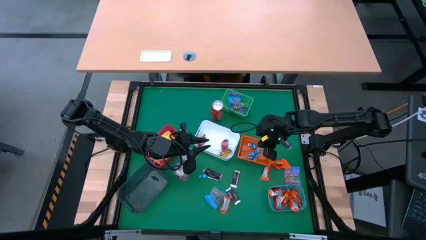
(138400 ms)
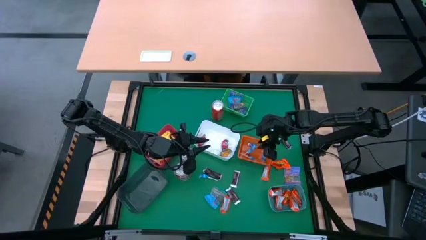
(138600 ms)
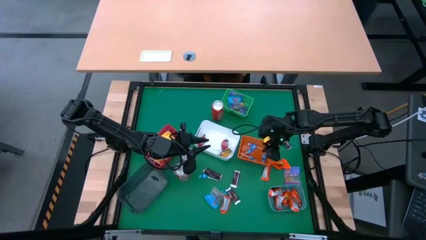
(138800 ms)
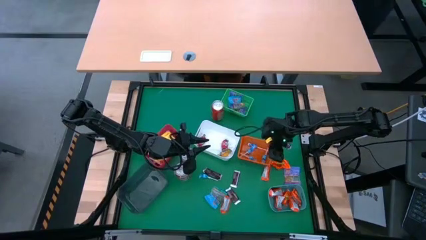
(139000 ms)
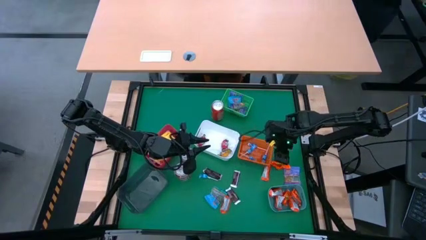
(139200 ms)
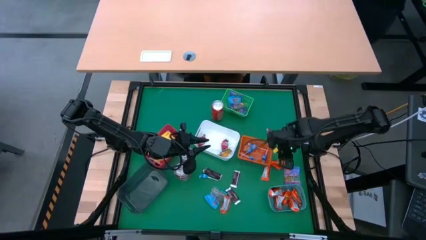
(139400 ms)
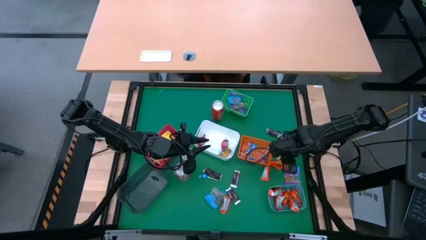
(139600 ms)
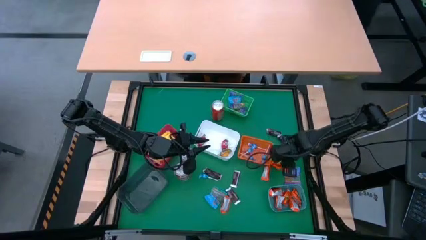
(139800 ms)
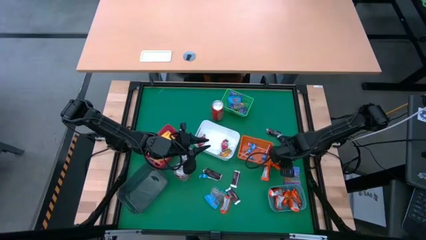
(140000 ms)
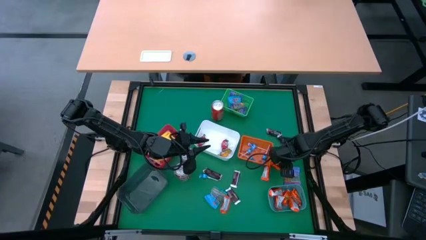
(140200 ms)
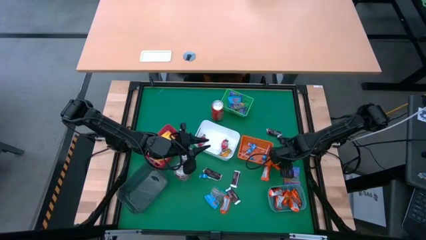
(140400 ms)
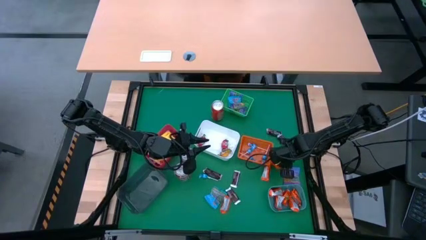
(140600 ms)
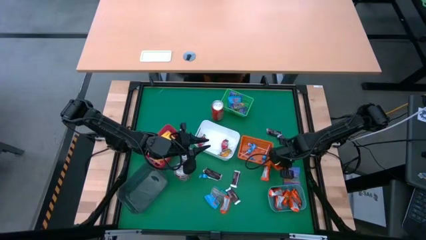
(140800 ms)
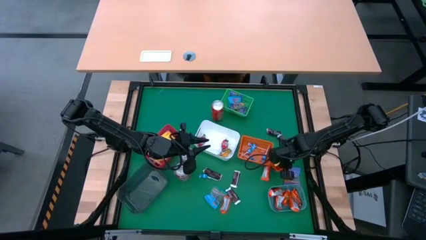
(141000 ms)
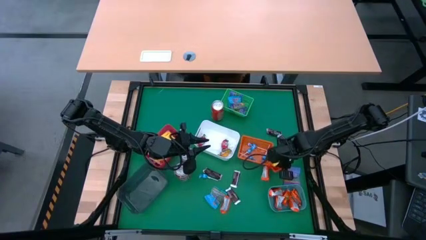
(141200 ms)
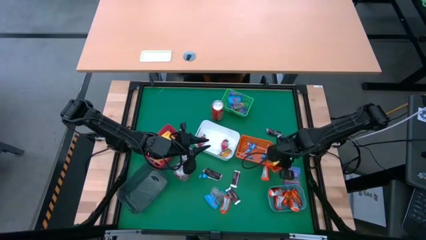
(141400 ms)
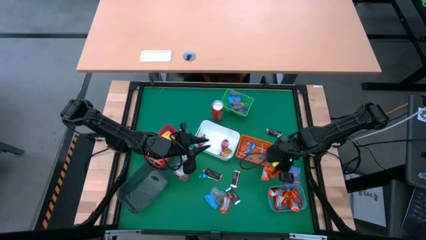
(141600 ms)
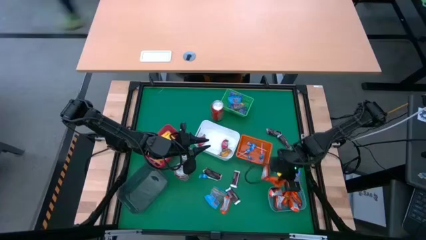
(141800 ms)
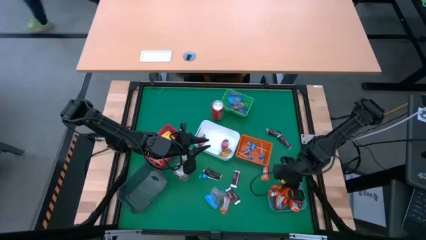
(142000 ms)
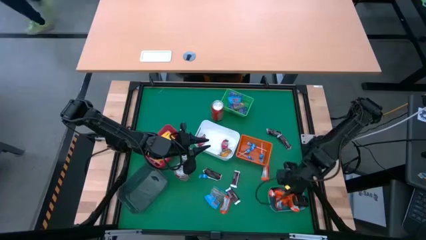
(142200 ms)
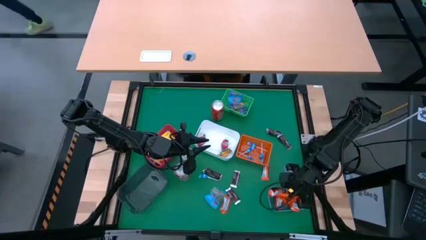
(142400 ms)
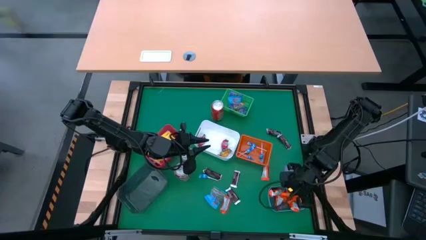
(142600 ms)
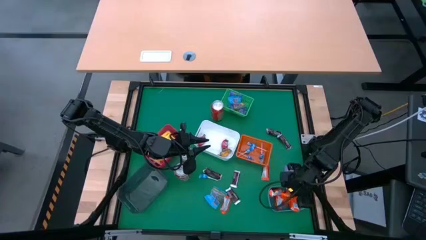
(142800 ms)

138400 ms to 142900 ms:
Task: Sort candy
Put the orange chocolate into the blue bin

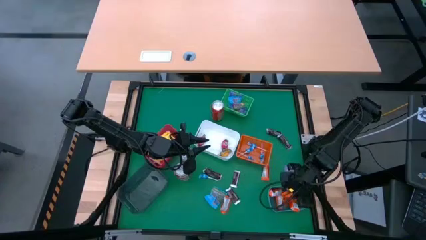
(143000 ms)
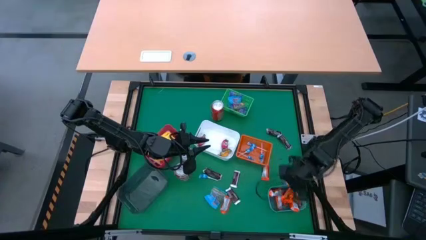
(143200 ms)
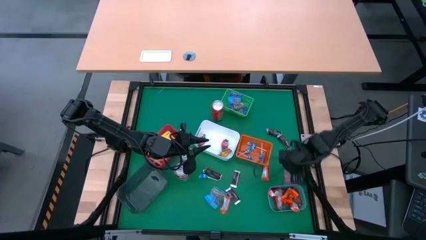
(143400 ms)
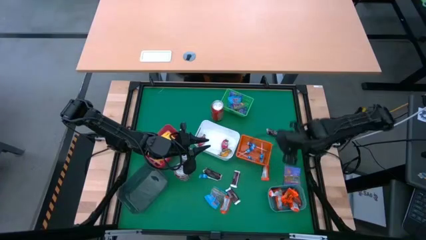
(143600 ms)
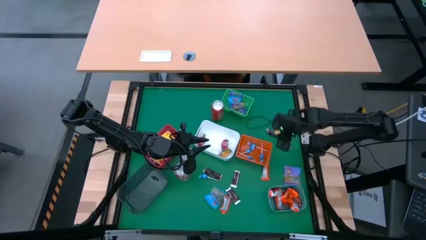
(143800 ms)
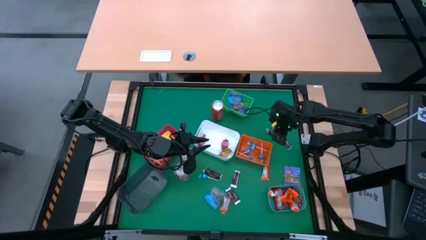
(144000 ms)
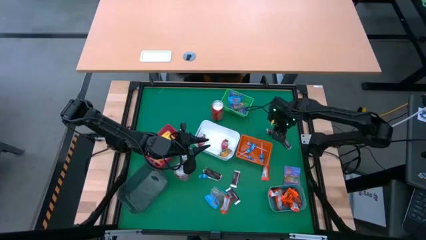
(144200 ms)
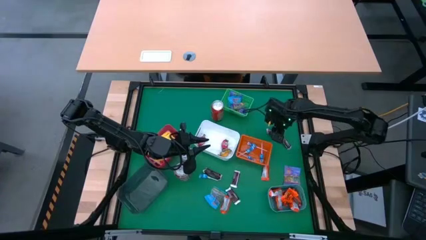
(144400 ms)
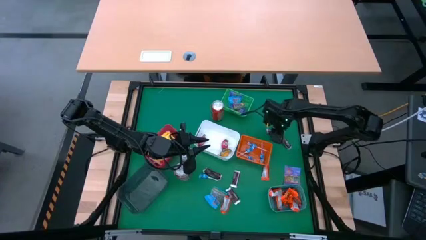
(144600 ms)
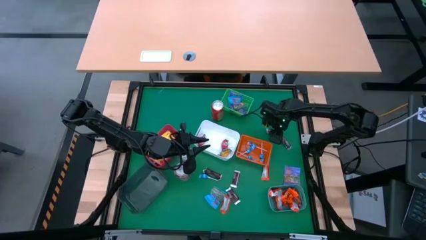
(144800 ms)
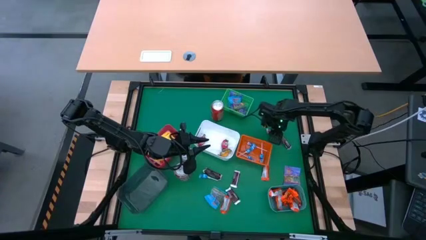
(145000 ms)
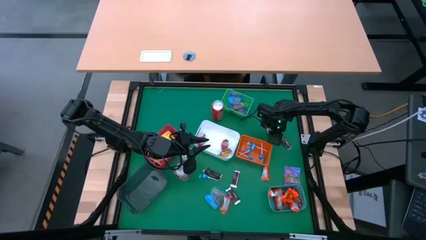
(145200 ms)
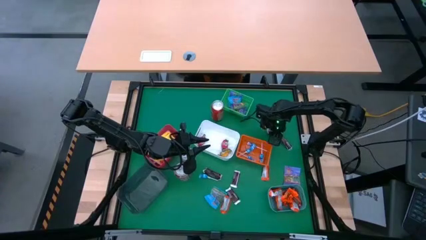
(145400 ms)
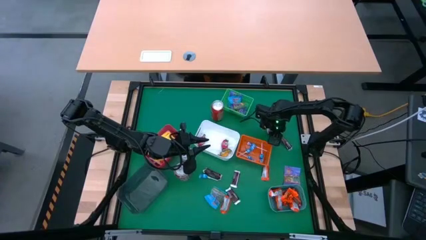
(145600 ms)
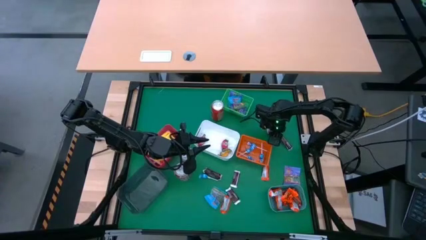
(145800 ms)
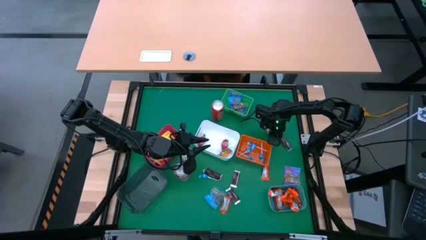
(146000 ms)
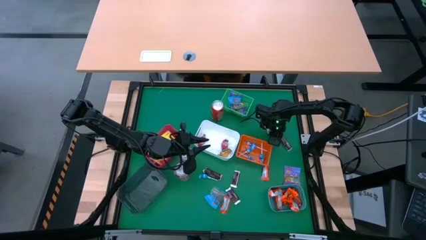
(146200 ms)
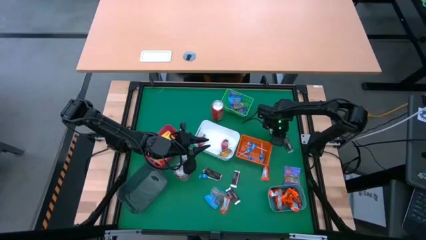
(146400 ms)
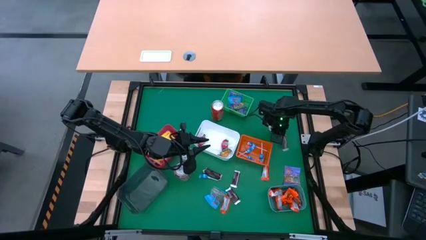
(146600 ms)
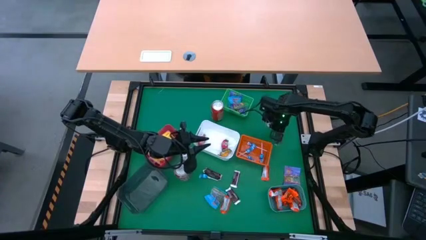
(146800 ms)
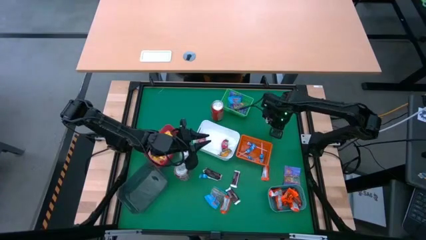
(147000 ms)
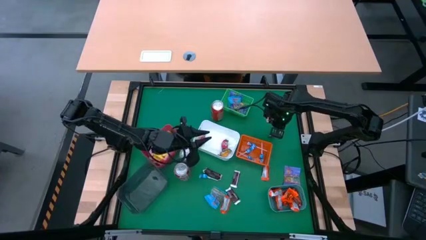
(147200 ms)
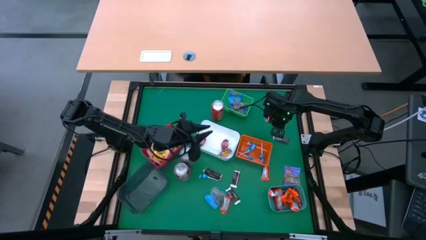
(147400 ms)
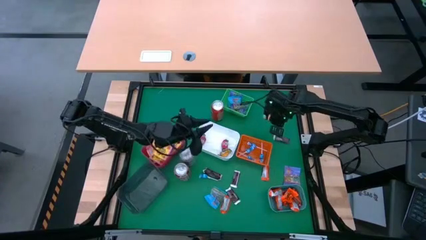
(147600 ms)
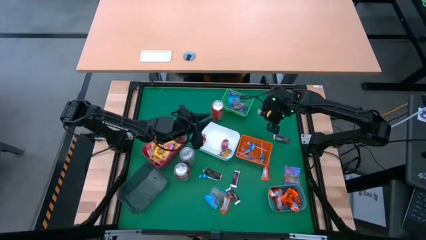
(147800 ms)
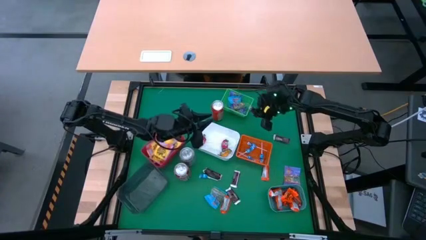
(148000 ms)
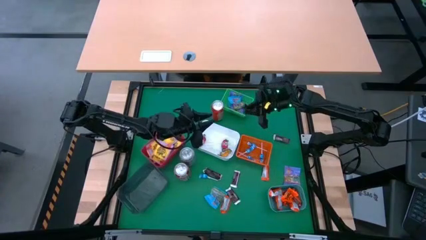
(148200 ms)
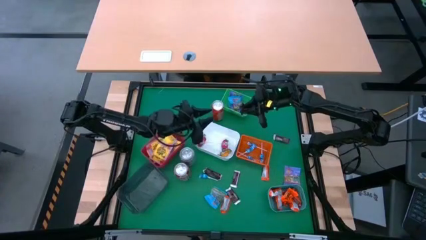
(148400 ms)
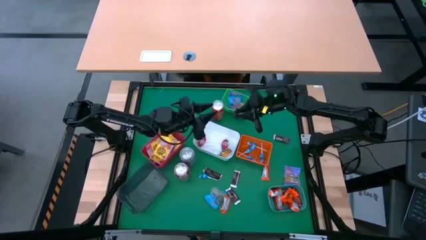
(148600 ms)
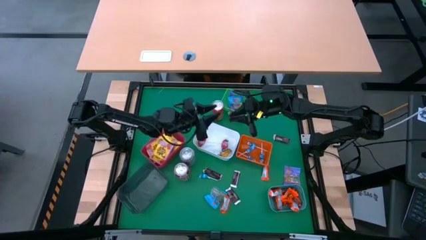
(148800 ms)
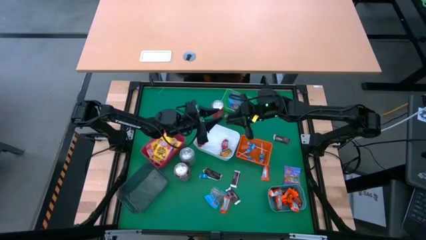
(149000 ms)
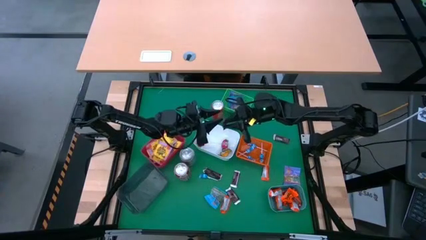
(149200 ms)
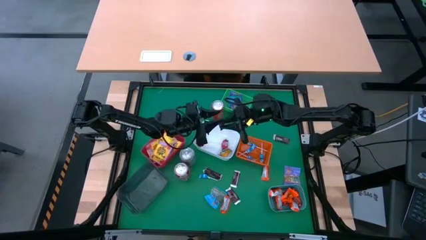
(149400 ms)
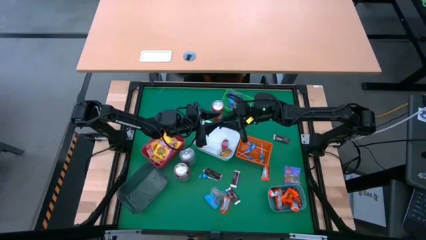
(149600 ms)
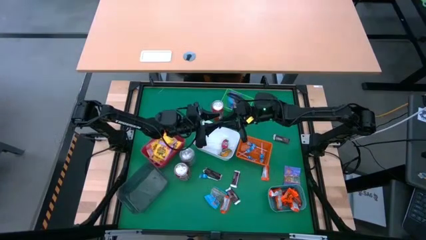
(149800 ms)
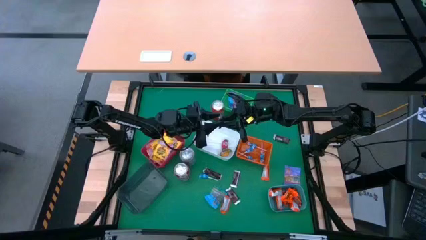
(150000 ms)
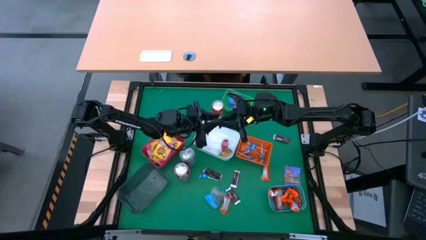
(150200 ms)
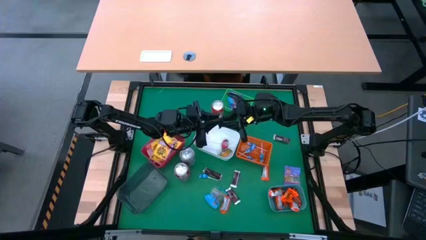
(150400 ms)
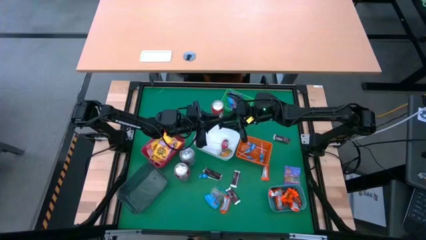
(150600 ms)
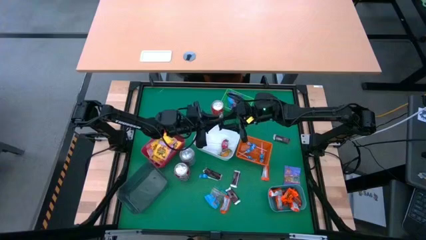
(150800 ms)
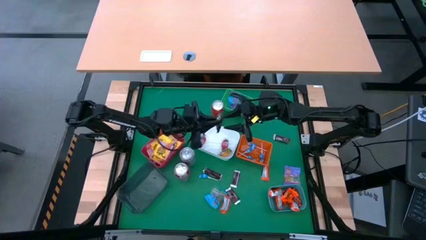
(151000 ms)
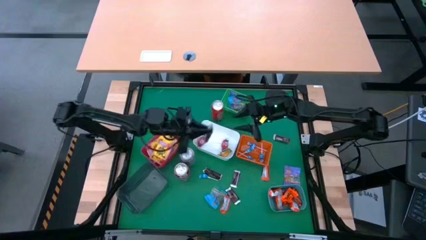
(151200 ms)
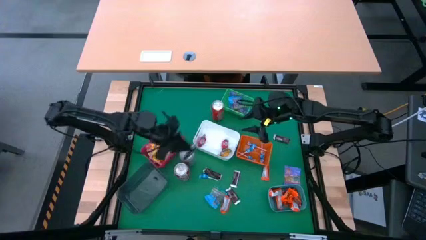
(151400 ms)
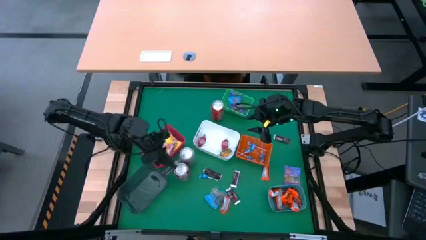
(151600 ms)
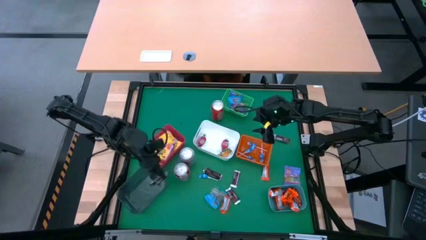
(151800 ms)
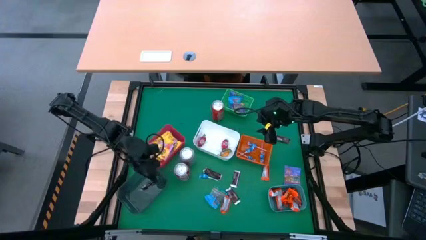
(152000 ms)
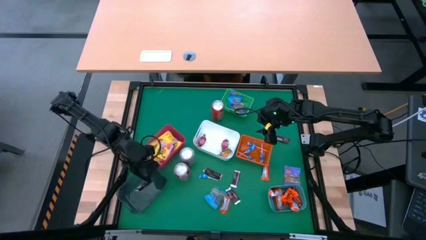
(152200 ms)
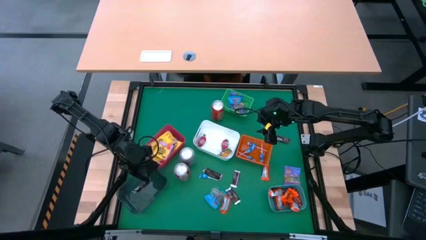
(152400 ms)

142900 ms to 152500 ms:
Put the brown chocolate bar into the black bin
